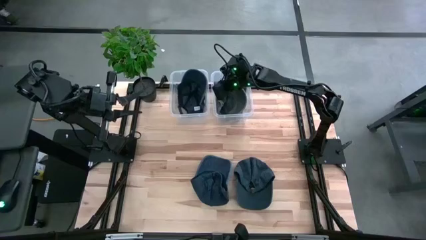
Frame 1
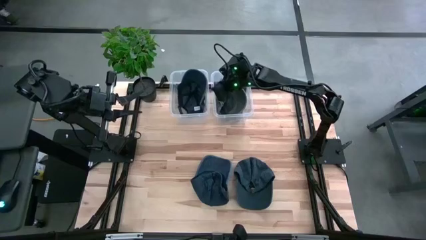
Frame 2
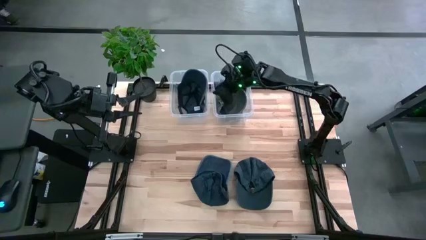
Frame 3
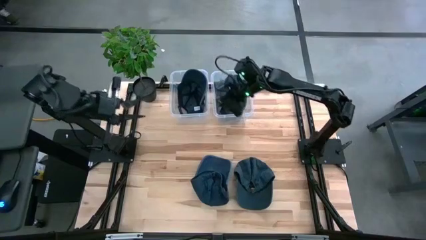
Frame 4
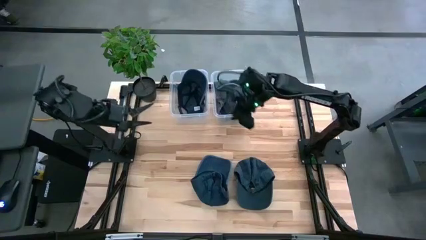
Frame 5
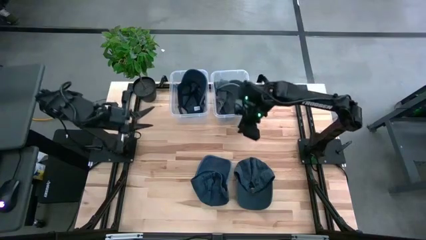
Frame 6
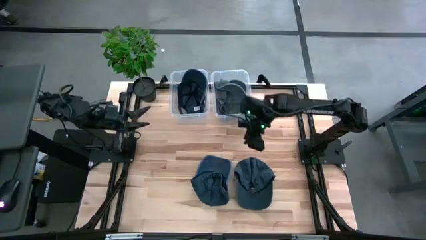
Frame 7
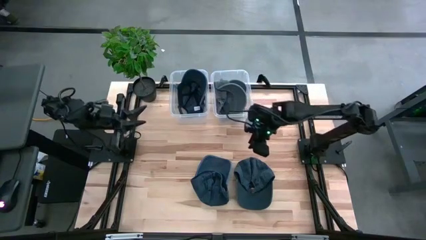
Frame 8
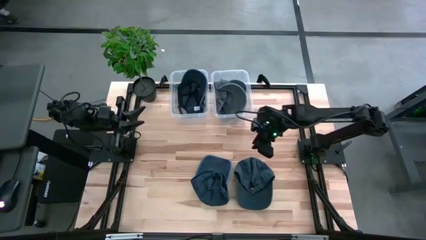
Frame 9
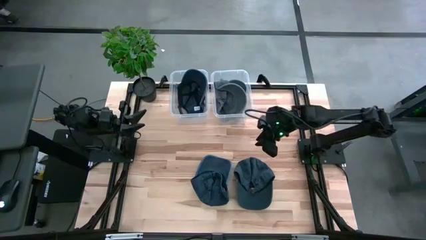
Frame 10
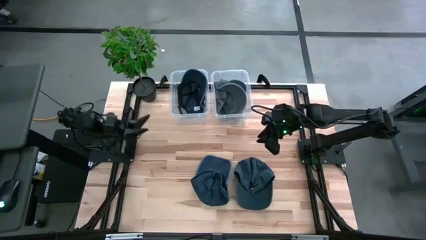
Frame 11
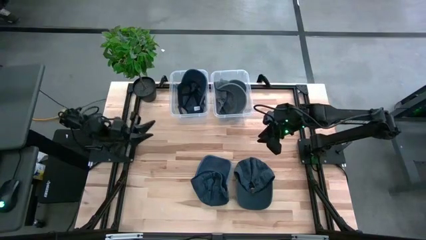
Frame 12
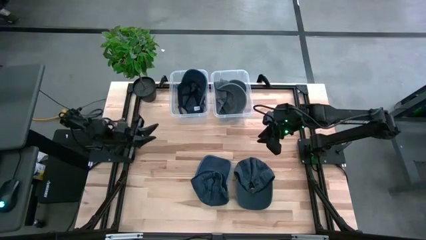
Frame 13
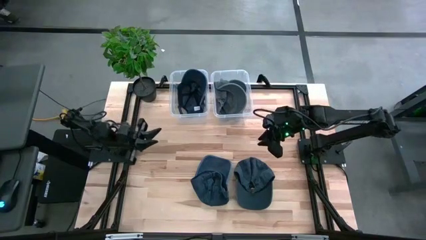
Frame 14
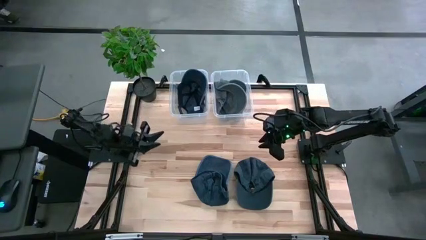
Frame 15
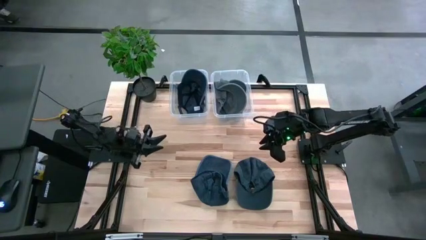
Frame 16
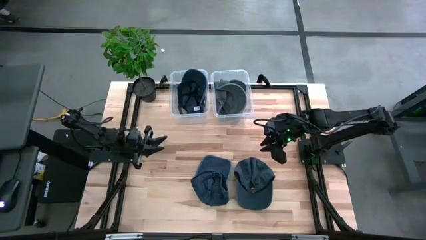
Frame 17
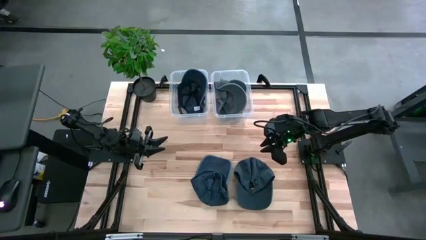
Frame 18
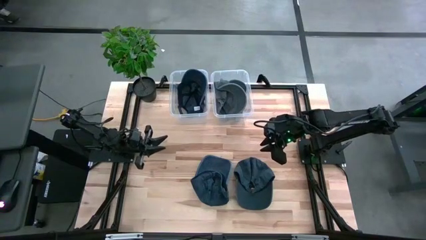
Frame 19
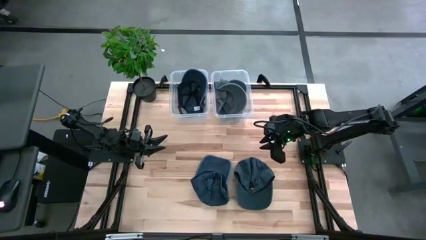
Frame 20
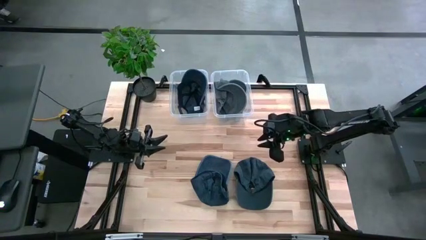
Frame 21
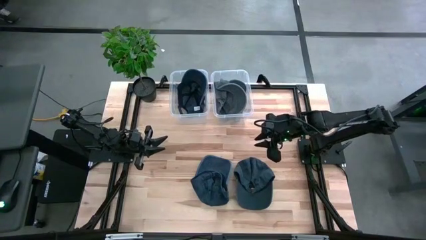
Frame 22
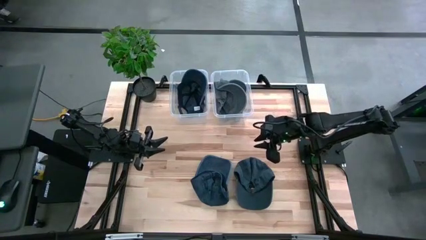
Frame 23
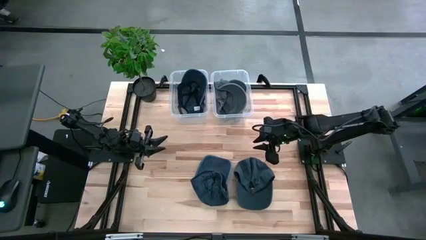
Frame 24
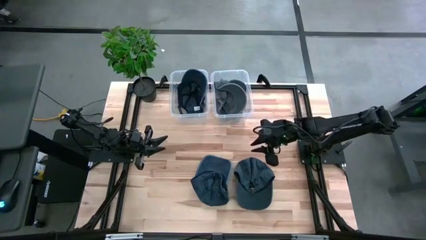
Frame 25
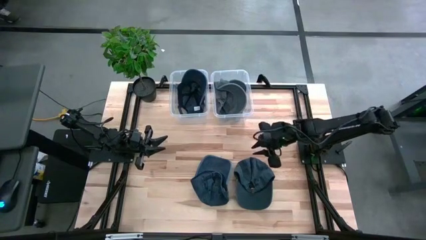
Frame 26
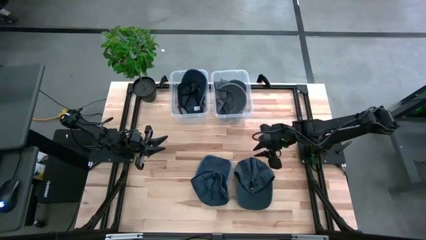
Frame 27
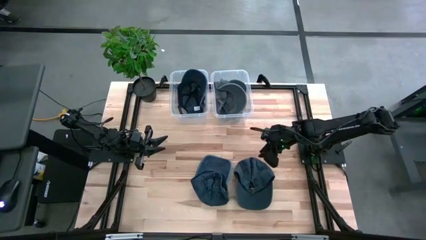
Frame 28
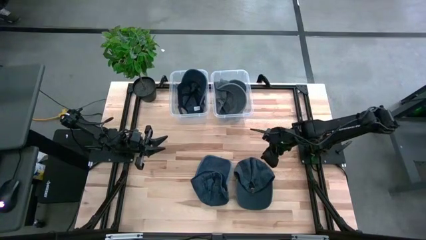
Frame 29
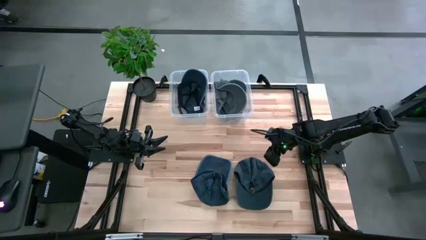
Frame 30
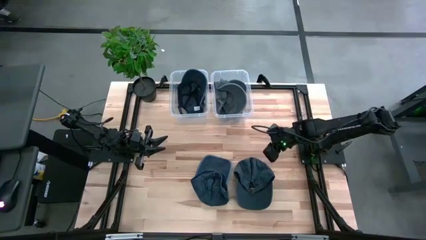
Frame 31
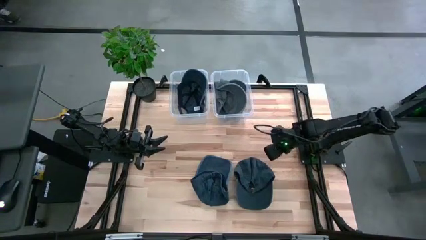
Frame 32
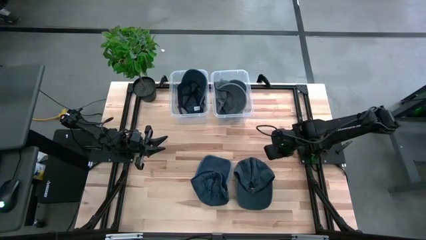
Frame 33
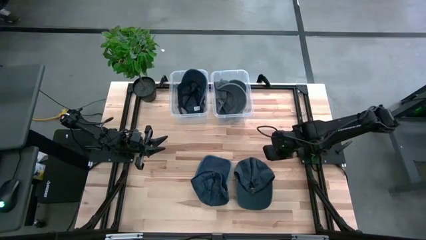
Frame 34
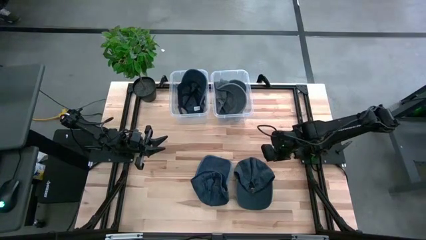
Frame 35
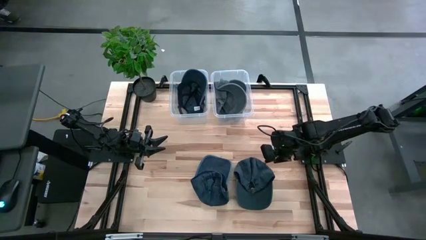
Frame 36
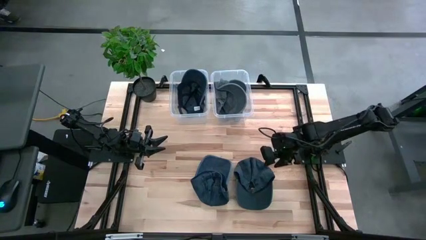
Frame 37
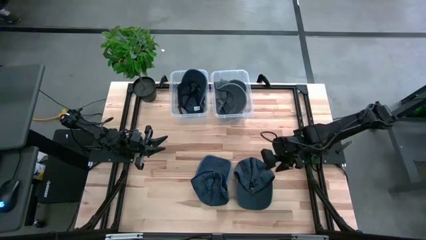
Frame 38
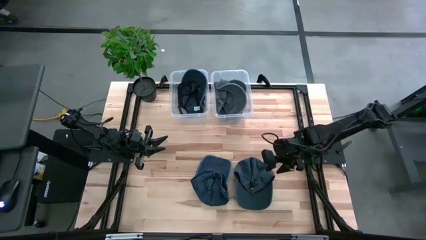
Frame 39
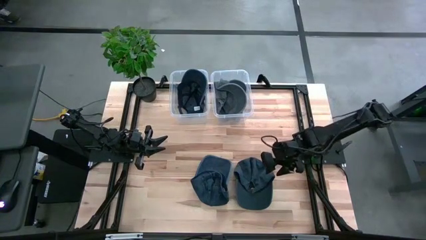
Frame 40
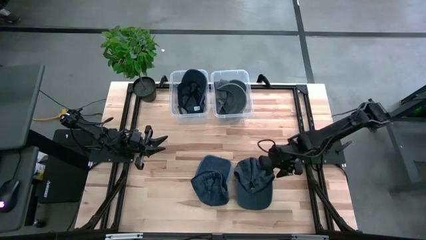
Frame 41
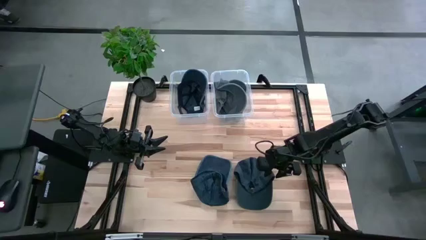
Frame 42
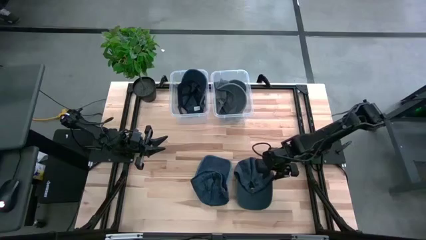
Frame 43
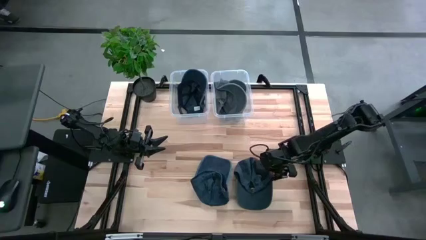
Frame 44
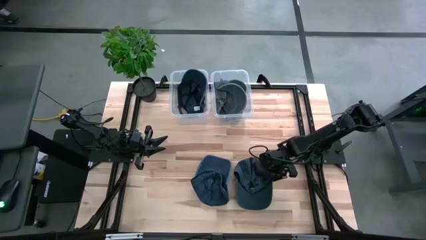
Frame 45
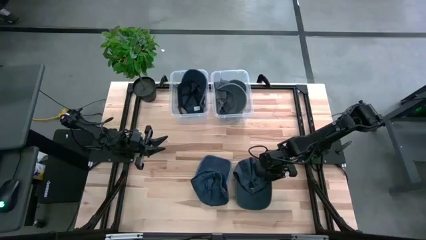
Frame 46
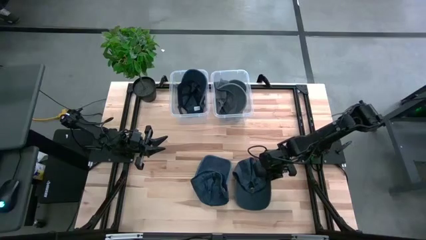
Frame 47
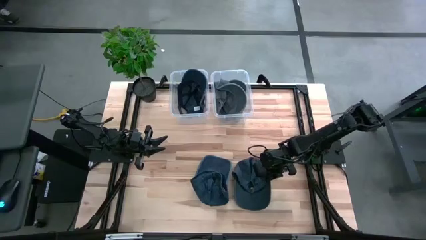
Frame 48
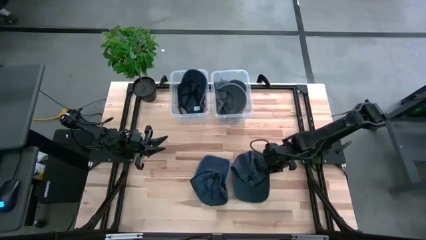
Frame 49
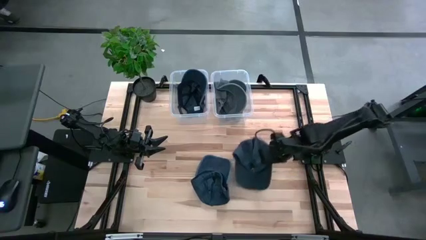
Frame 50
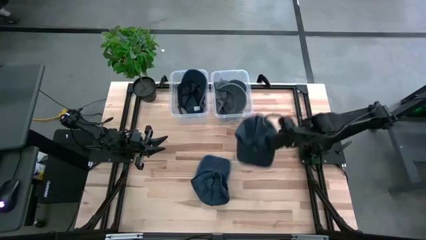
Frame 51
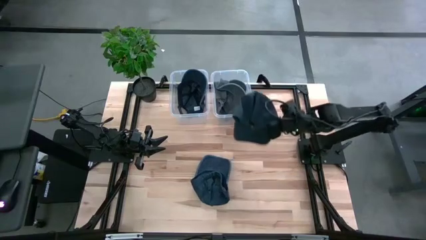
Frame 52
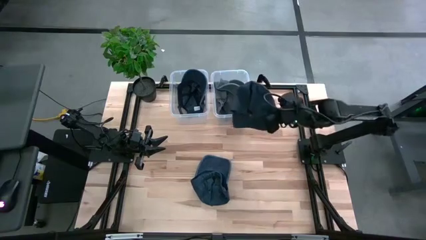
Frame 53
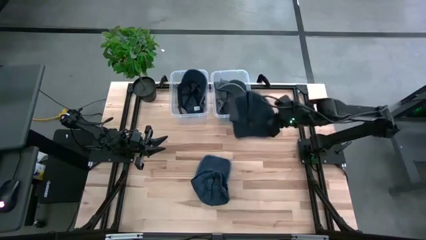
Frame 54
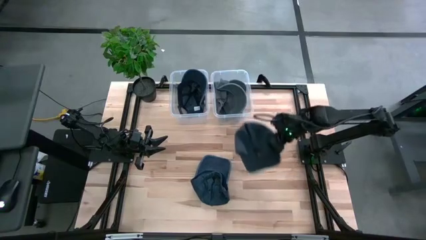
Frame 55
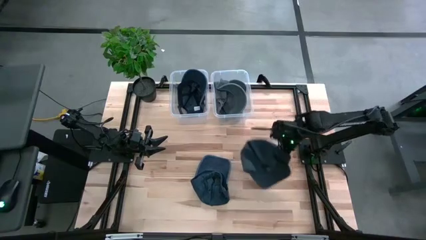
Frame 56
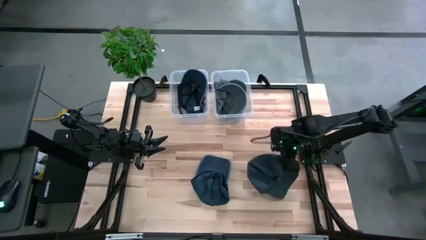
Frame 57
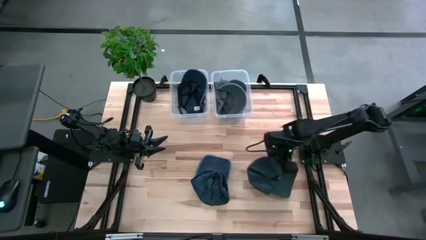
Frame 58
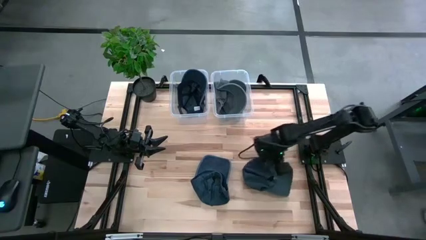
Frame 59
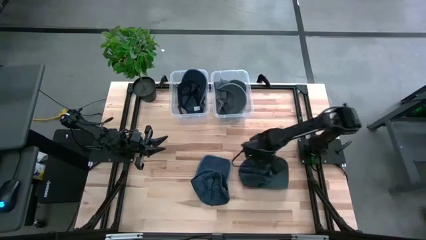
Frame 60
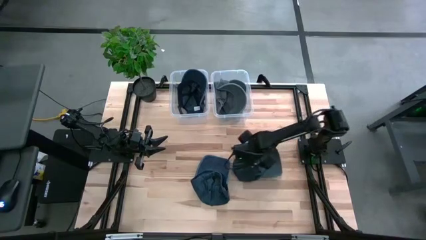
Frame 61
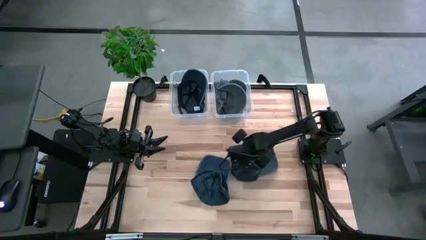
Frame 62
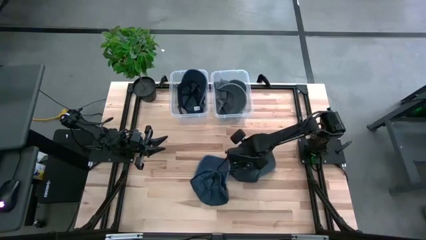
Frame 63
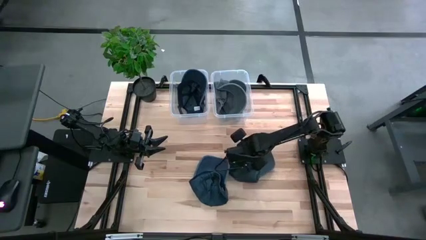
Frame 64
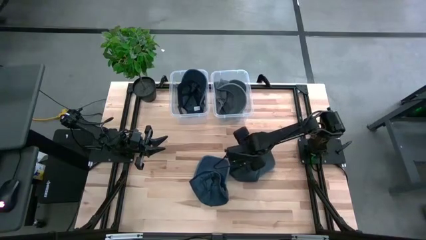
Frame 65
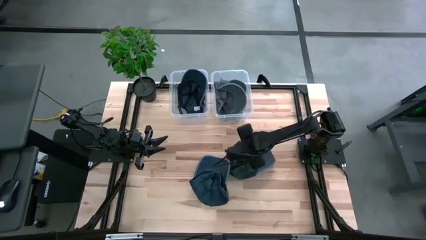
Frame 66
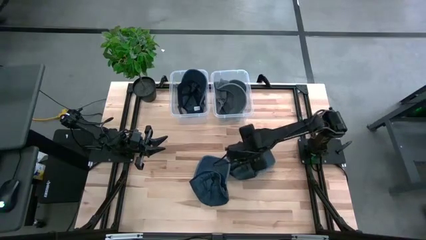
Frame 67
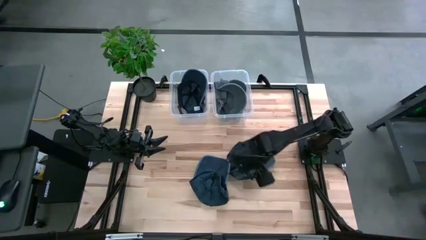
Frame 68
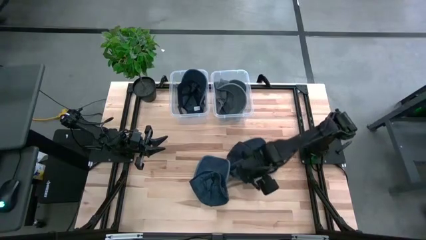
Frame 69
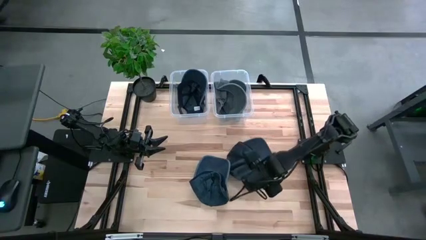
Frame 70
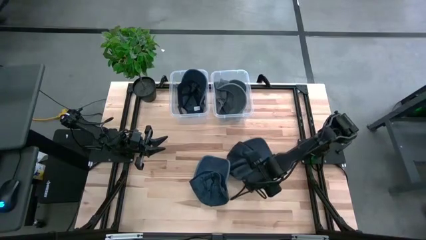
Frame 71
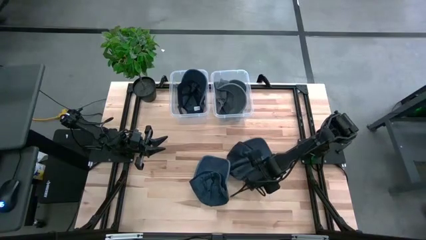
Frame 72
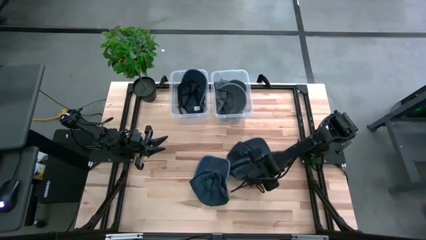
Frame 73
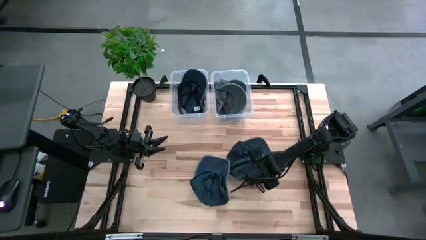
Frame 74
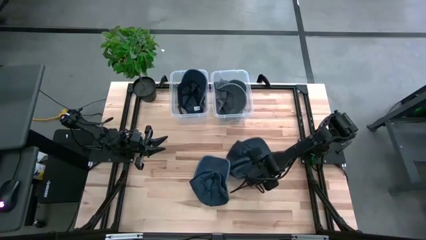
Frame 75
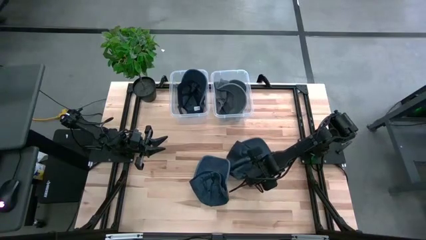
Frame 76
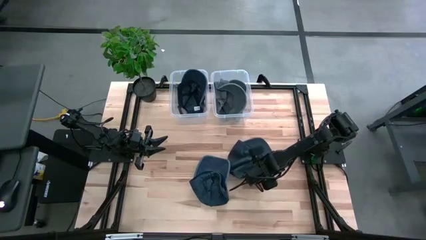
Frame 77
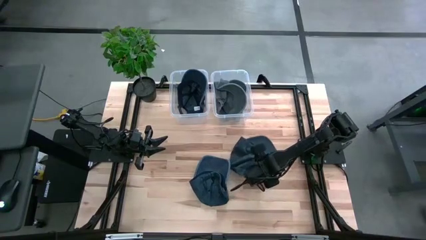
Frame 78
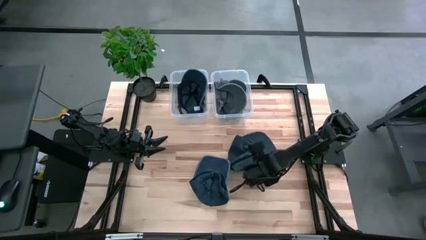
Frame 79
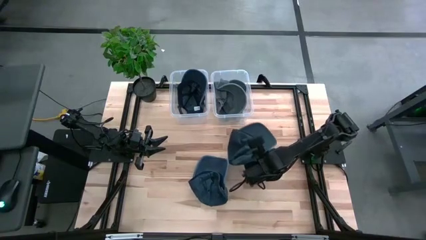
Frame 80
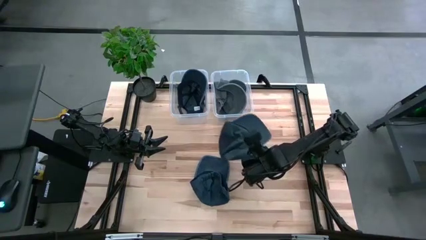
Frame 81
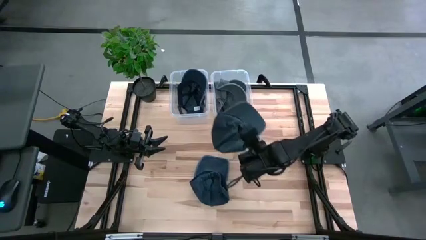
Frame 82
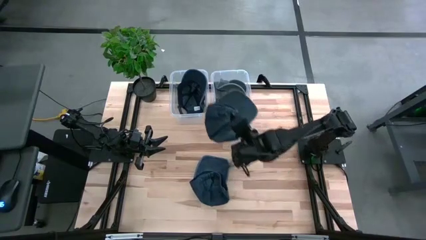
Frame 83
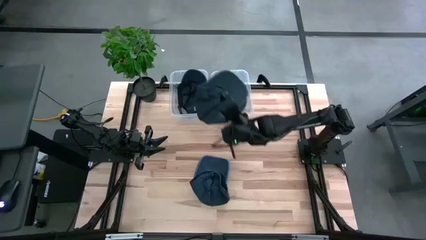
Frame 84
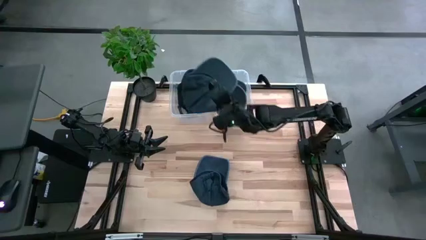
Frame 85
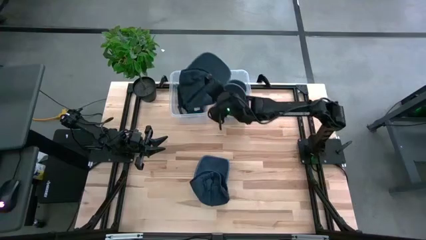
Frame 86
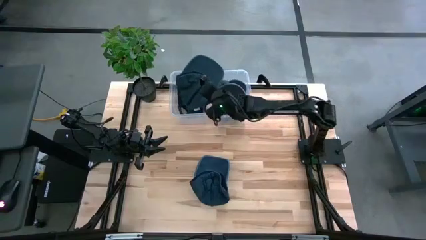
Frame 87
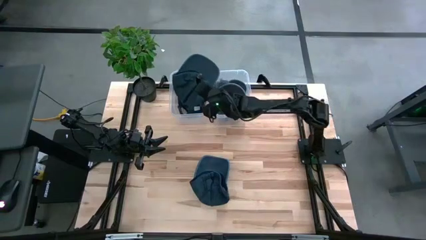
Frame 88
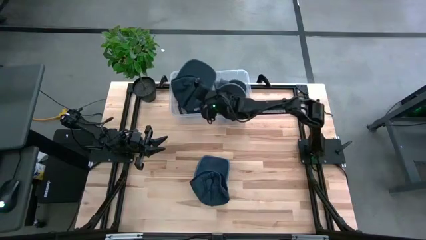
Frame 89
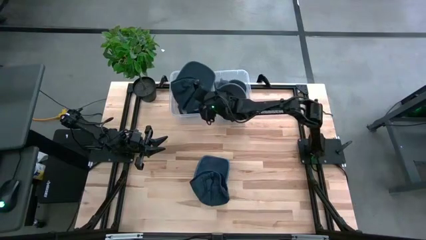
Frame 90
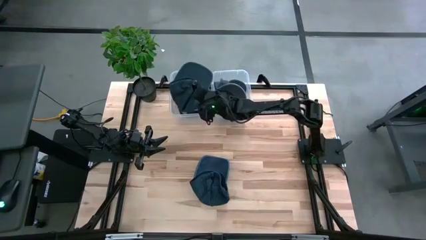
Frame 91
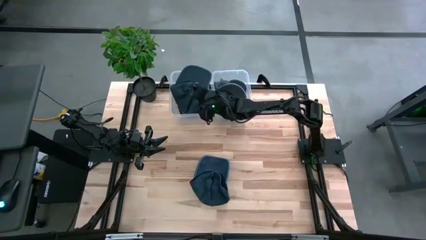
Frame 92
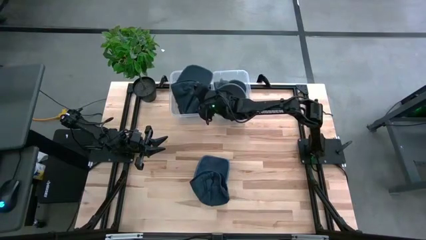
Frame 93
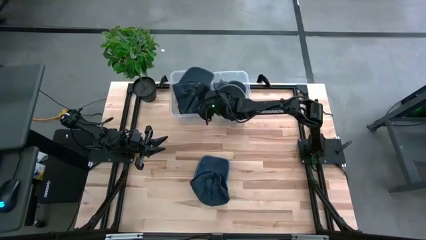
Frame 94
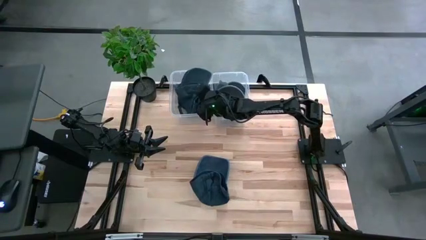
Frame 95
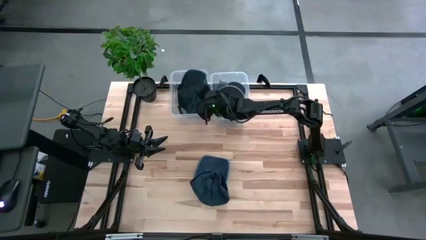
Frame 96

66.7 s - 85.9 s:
Task: Pick & Place hat
Put the right blue cap into the left transparent bin
